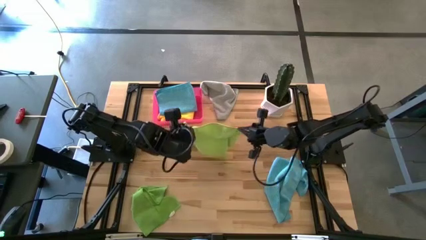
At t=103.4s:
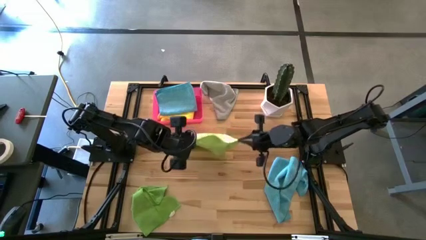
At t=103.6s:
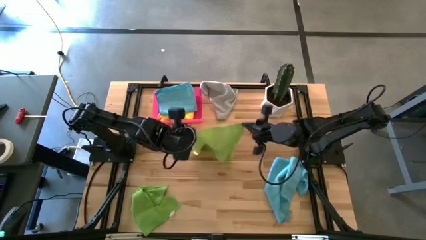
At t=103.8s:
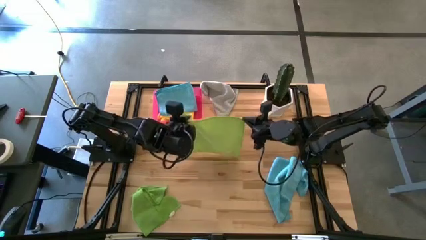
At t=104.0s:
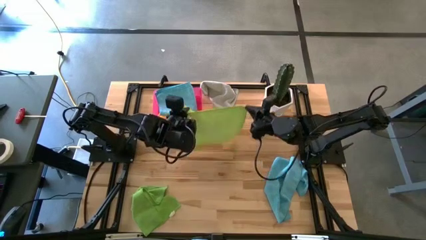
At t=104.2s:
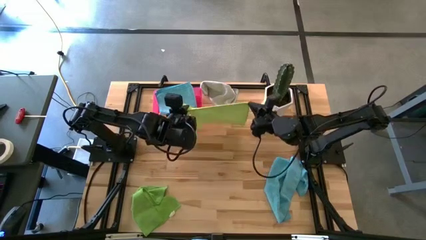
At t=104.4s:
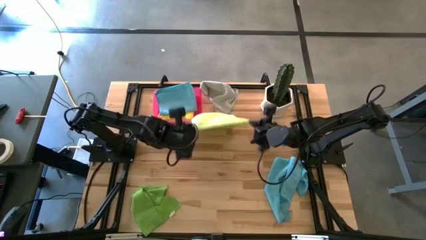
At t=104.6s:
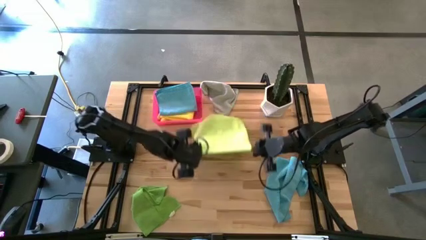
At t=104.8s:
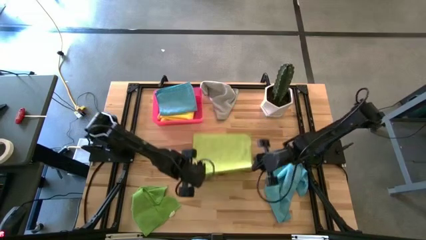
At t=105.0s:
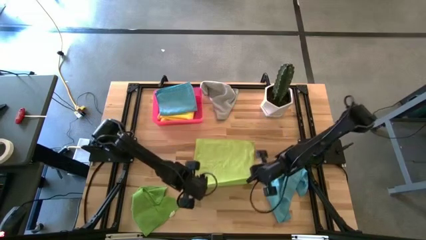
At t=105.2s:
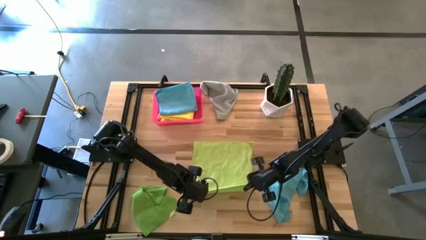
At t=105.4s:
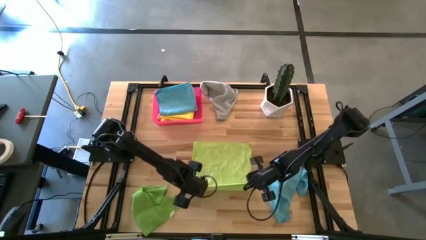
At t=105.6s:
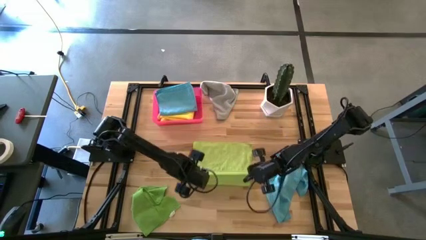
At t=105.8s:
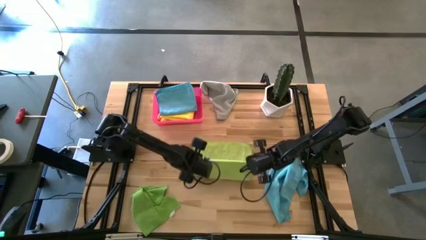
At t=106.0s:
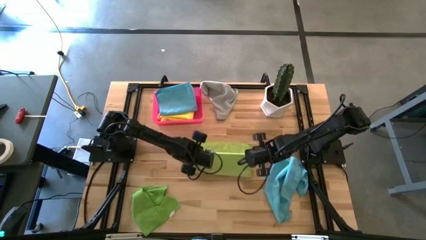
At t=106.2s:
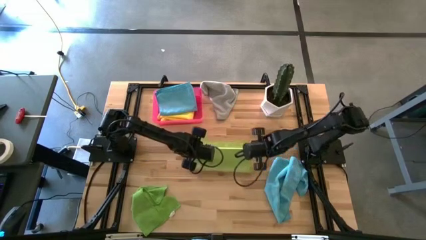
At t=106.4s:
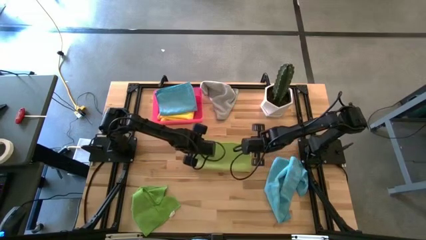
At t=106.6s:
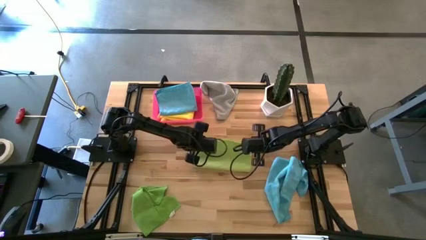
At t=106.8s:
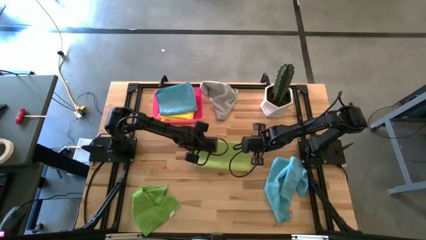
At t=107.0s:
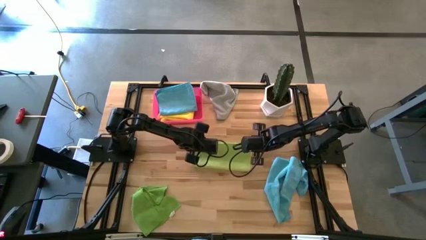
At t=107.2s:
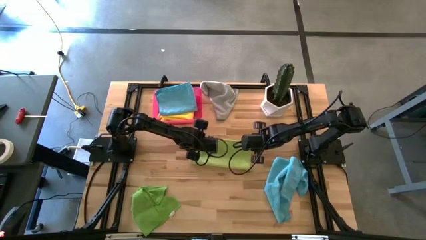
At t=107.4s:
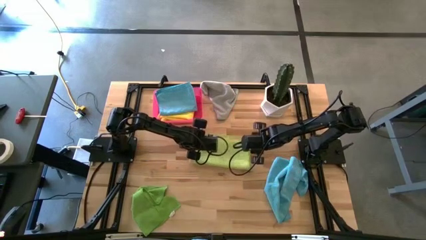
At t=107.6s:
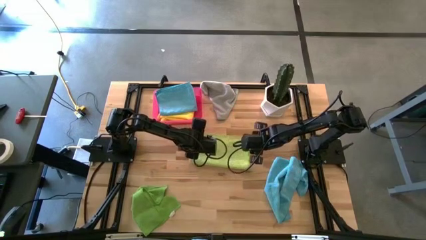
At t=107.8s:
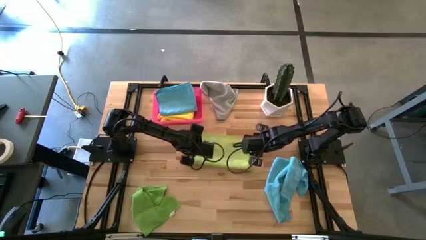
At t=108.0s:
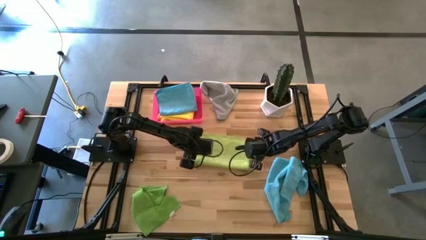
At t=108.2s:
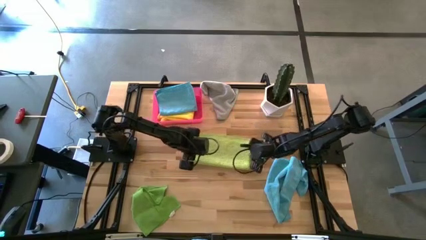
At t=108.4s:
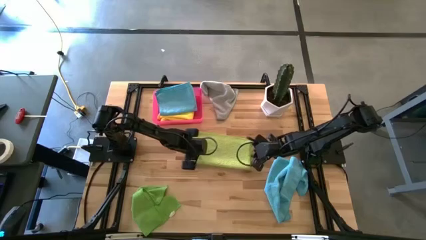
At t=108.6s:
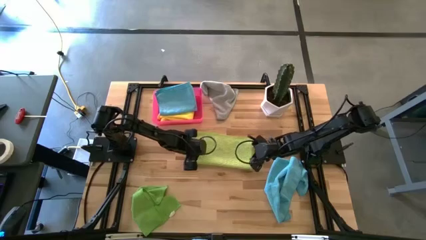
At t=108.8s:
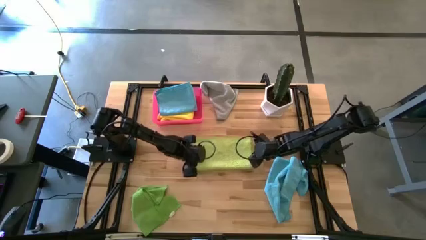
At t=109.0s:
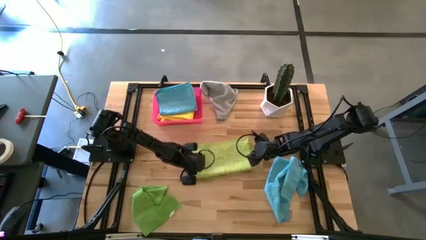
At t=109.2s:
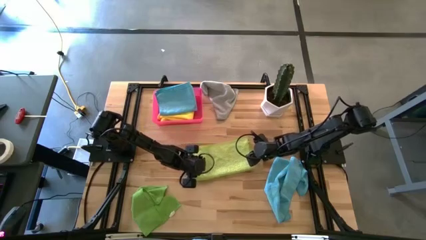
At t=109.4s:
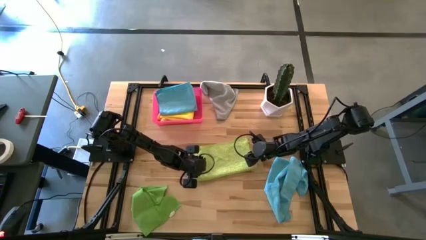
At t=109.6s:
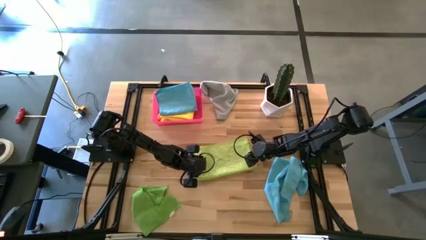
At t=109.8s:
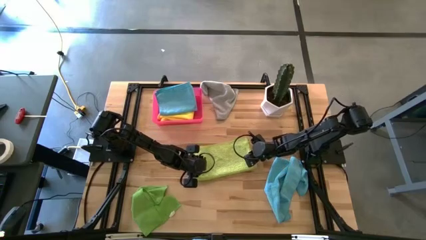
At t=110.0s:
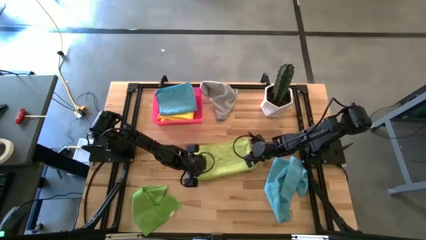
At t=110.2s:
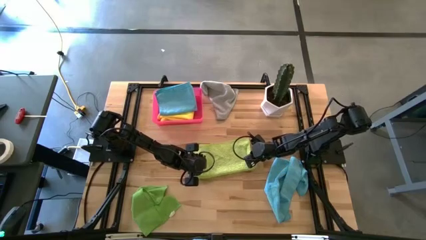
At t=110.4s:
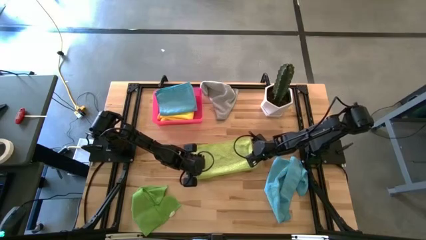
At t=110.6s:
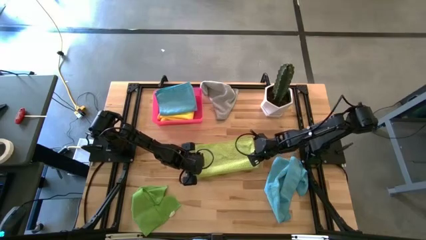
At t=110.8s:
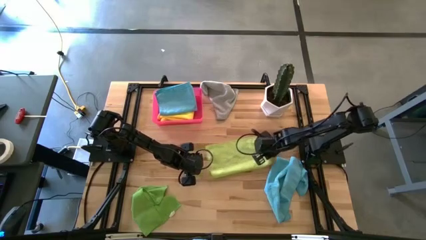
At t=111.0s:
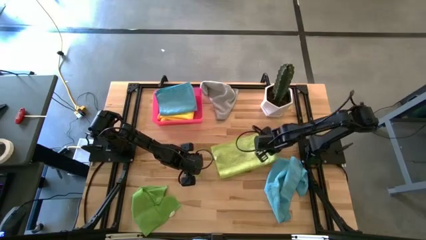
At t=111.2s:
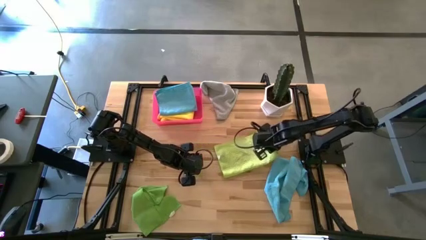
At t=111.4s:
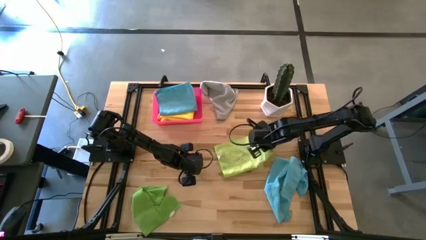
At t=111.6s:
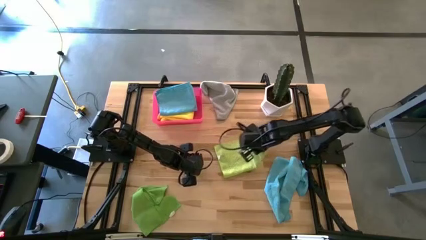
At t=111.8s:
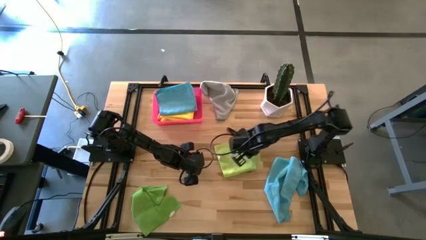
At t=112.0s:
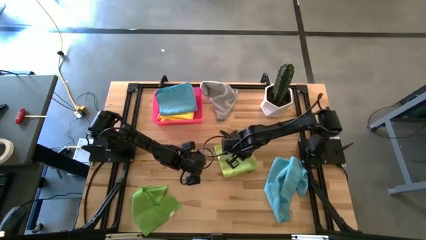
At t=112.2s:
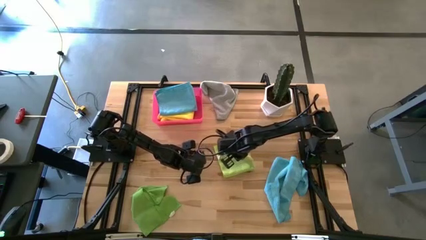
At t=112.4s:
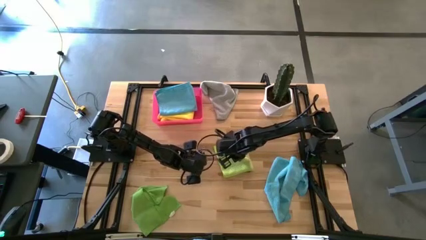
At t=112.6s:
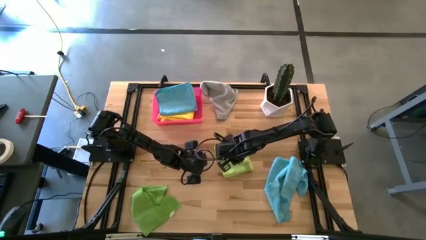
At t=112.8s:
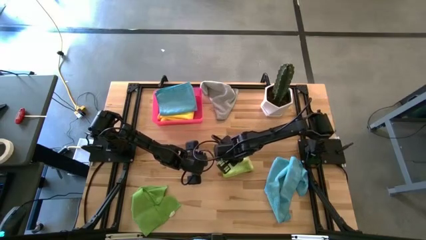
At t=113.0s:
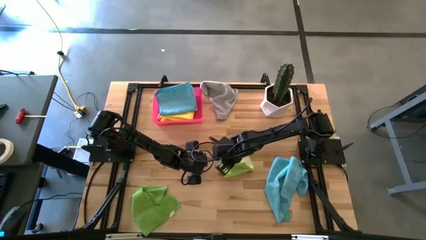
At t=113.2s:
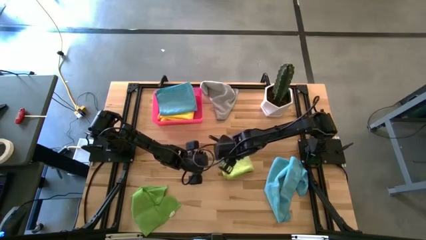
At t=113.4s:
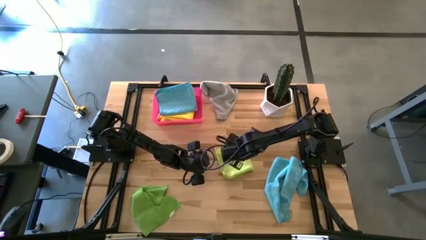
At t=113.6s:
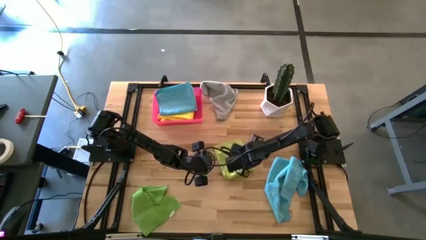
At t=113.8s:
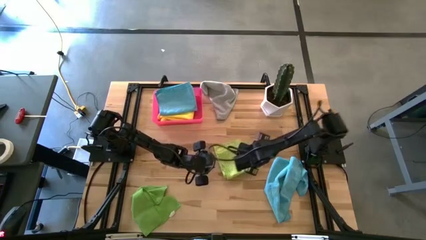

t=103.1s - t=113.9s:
Task: Fold microfiber towels
Fold the light green towel on the table

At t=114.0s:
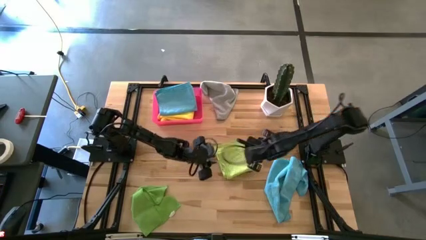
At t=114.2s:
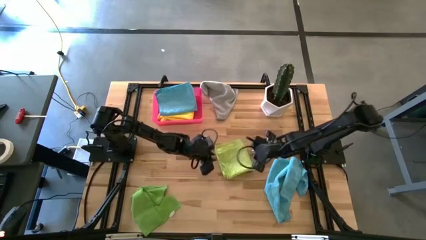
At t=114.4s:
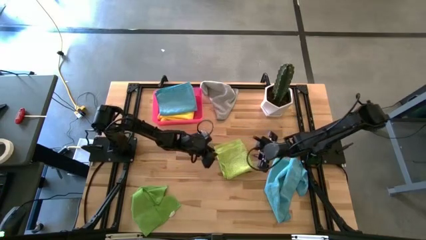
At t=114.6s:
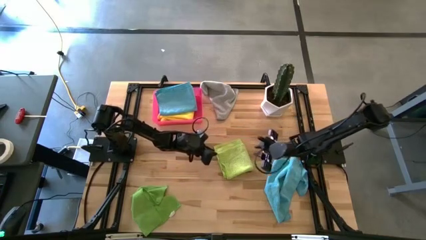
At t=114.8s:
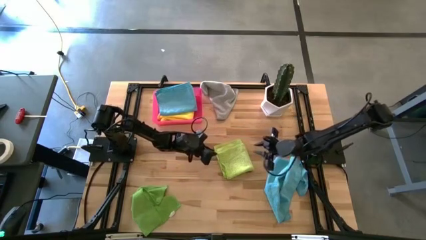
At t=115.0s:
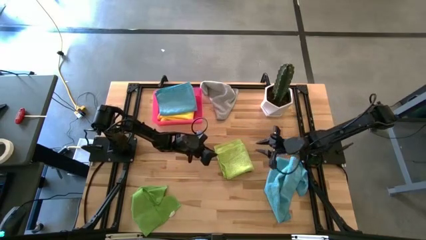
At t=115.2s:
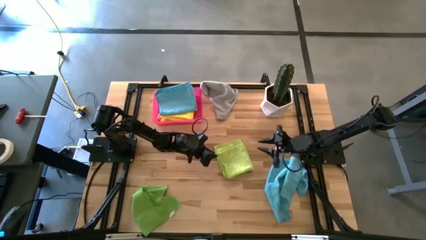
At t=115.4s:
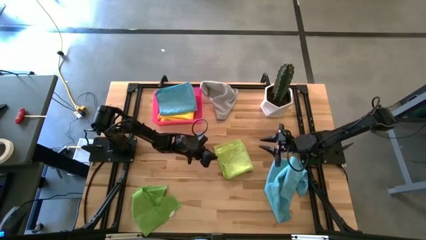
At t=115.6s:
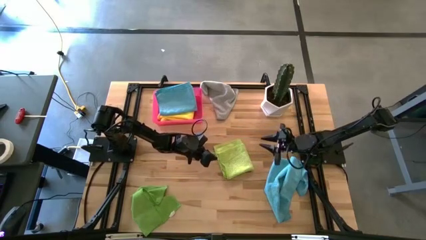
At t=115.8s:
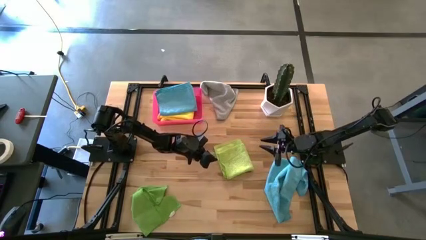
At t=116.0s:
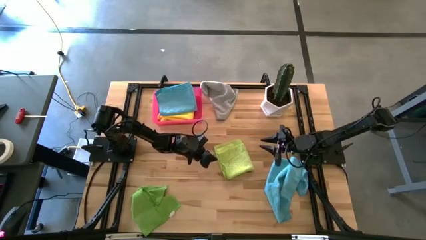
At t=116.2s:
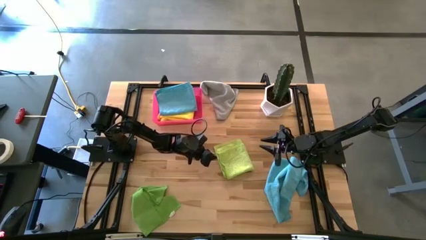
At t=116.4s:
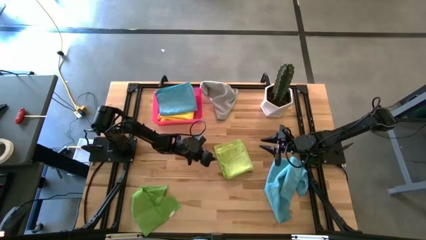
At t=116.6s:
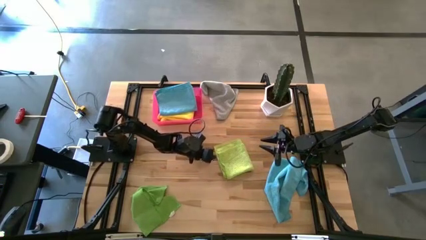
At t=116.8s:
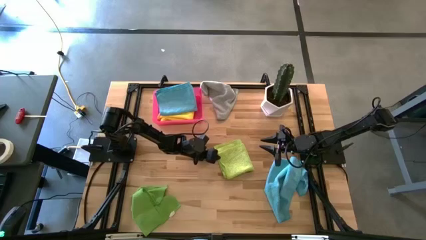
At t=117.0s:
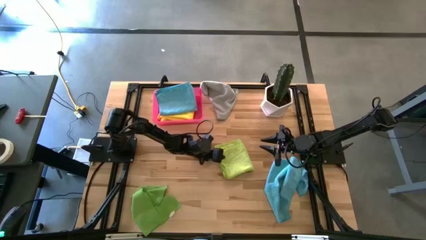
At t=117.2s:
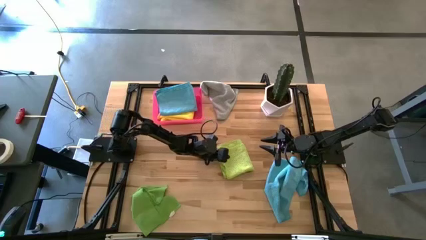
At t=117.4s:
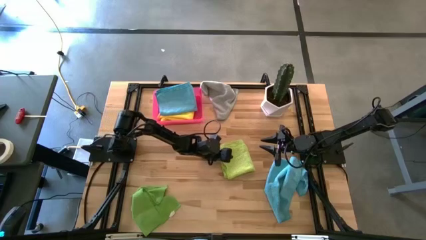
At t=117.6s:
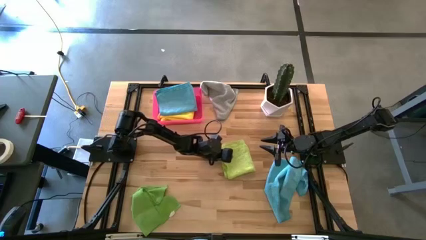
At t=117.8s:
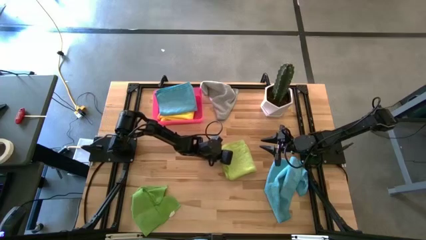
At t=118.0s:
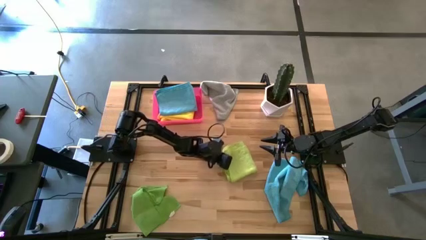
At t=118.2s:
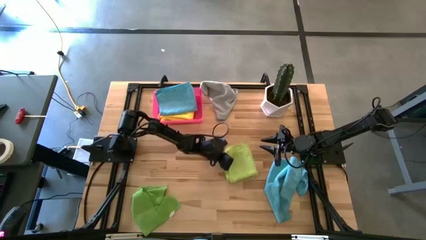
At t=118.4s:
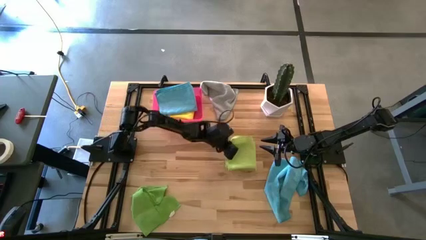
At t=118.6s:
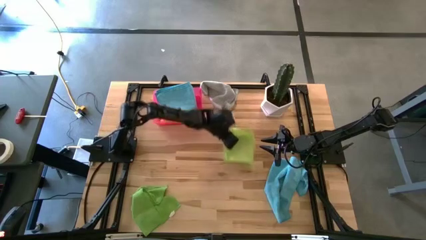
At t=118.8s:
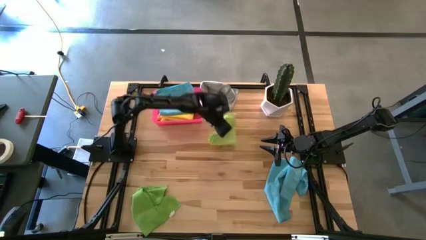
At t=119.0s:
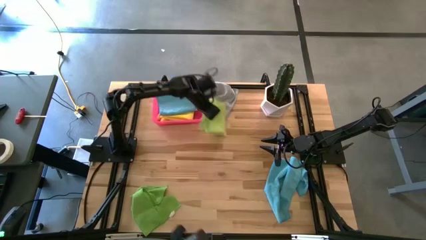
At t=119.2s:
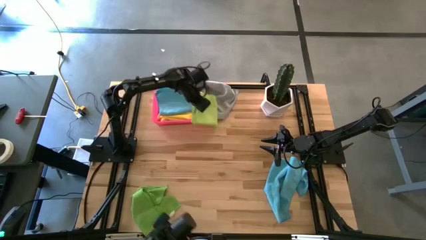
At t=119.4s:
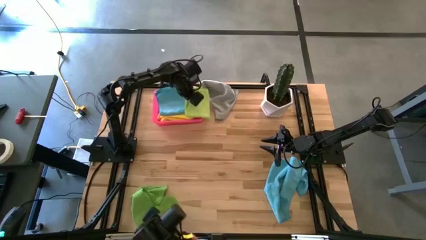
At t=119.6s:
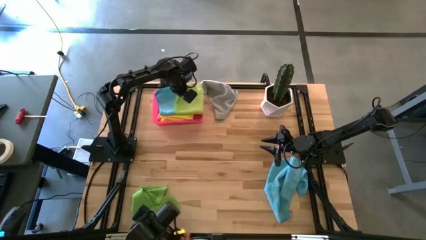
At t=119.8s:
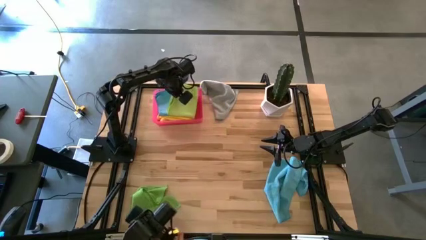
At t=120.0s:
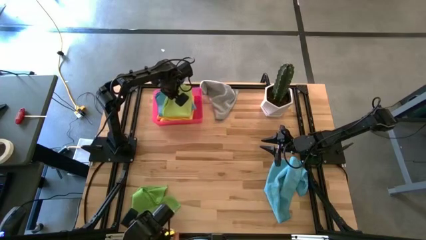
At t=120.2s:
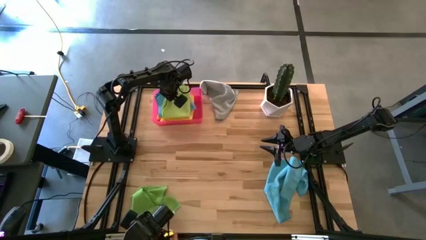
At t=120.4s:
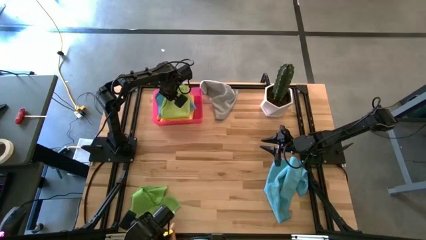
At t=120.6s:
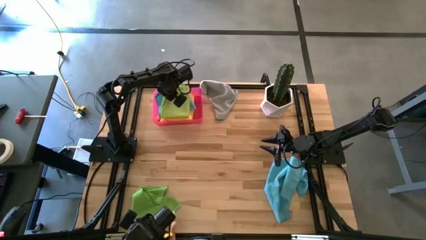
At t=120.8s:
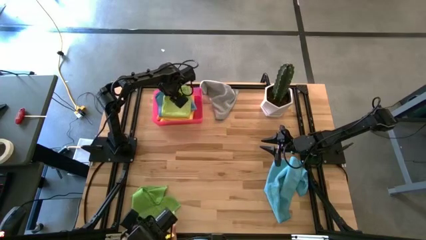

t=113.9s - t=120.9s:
Put the light green towel into the bin
